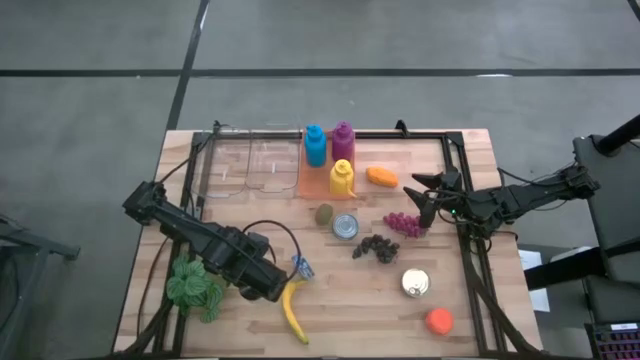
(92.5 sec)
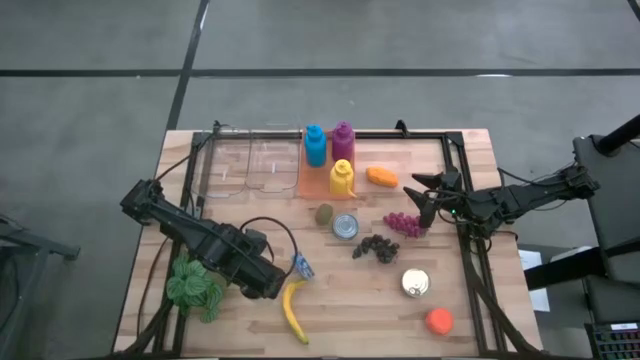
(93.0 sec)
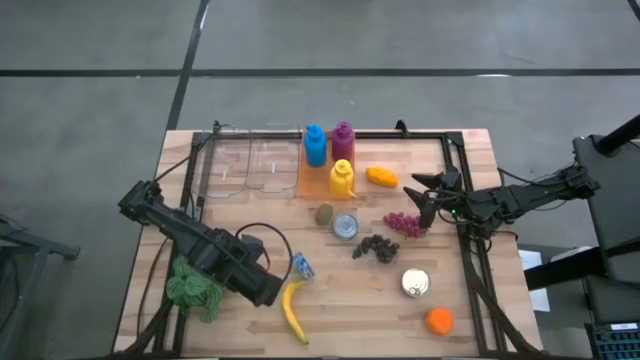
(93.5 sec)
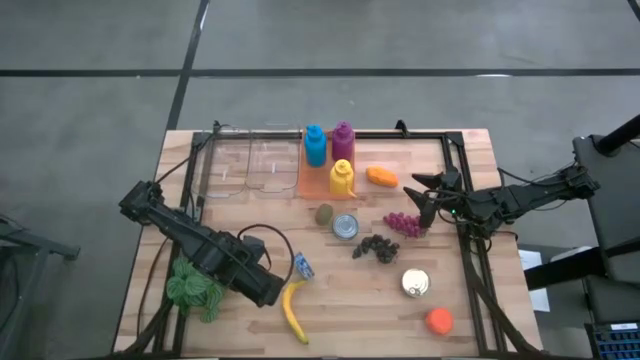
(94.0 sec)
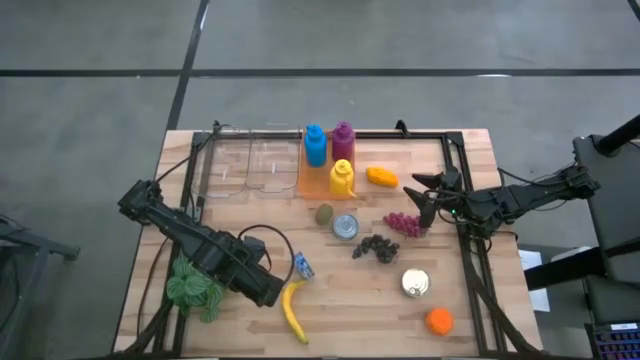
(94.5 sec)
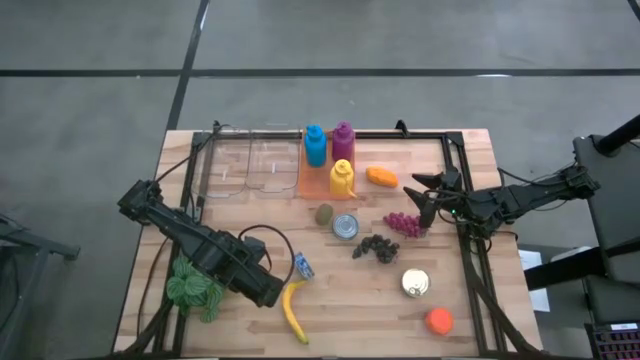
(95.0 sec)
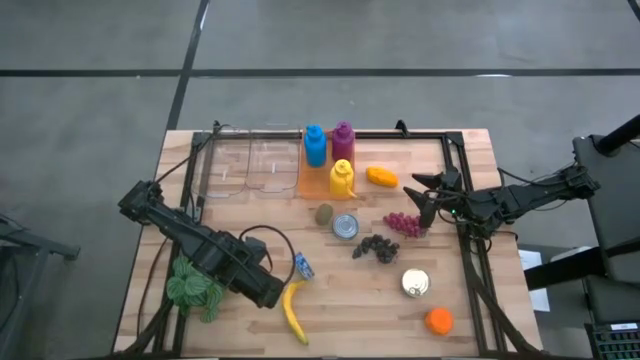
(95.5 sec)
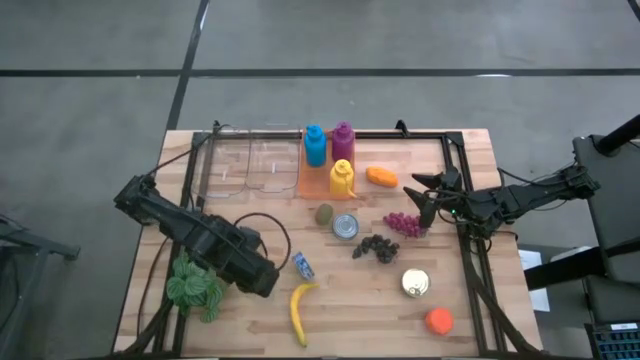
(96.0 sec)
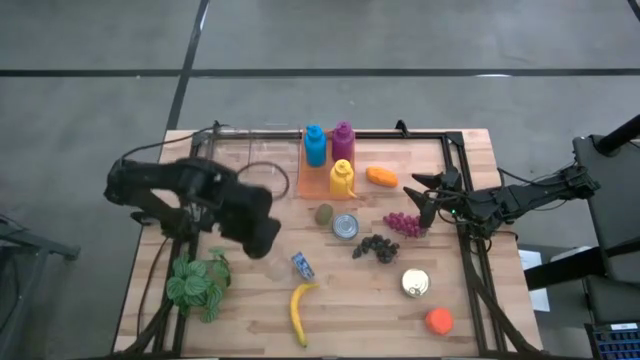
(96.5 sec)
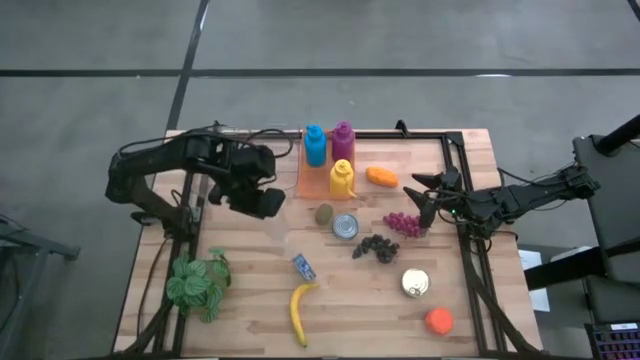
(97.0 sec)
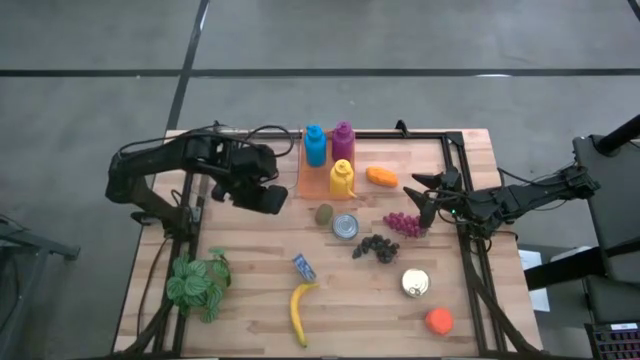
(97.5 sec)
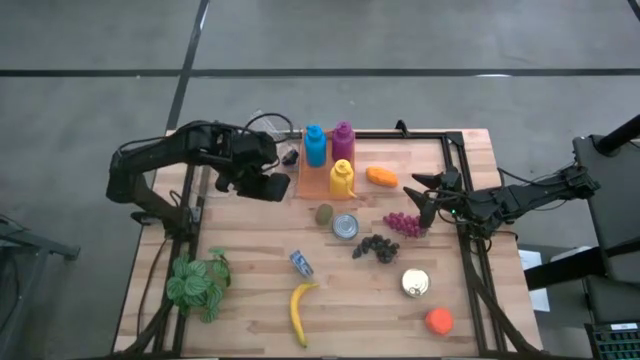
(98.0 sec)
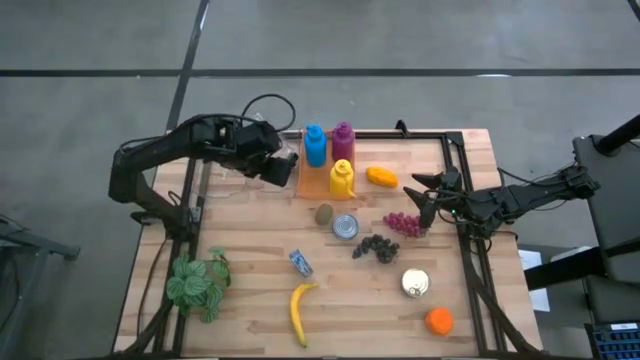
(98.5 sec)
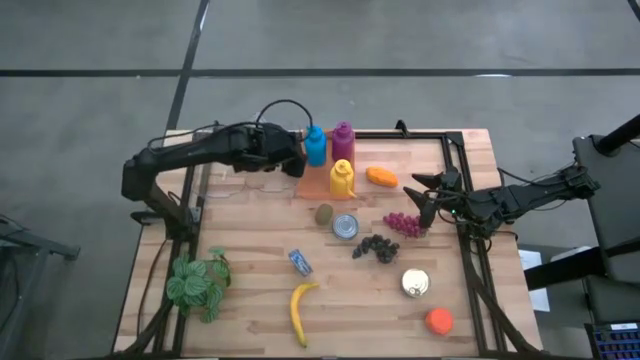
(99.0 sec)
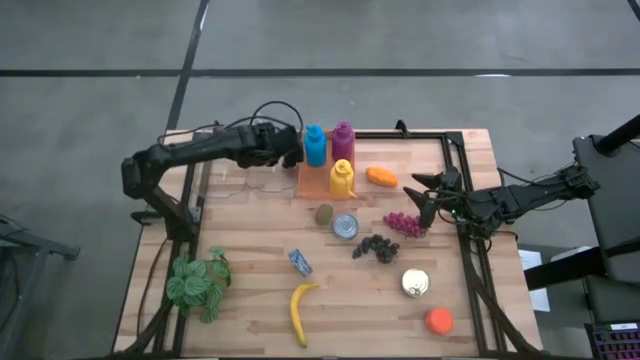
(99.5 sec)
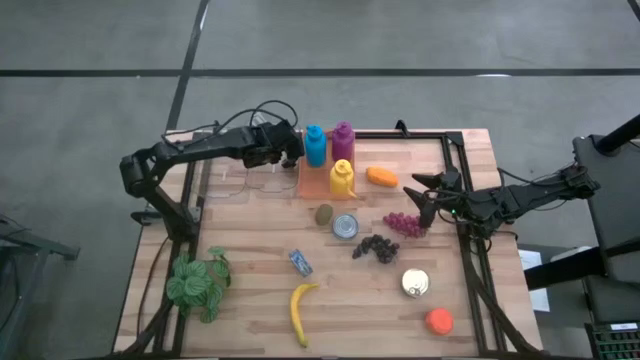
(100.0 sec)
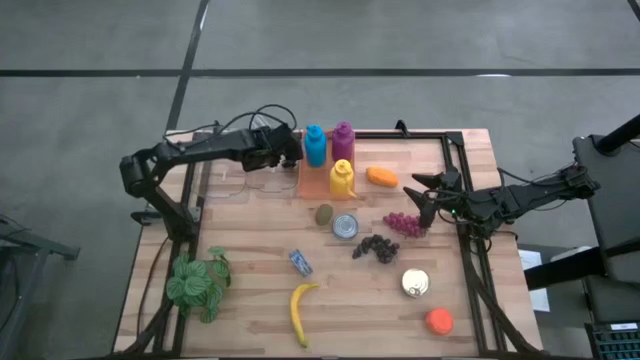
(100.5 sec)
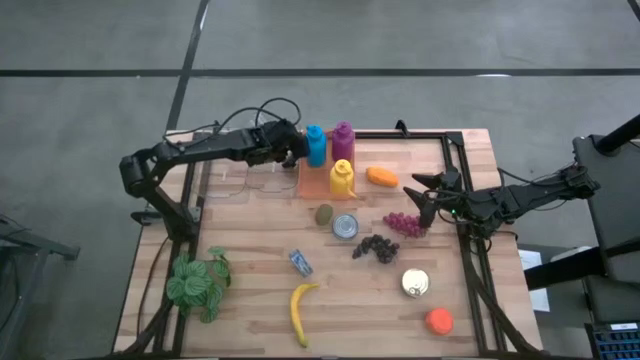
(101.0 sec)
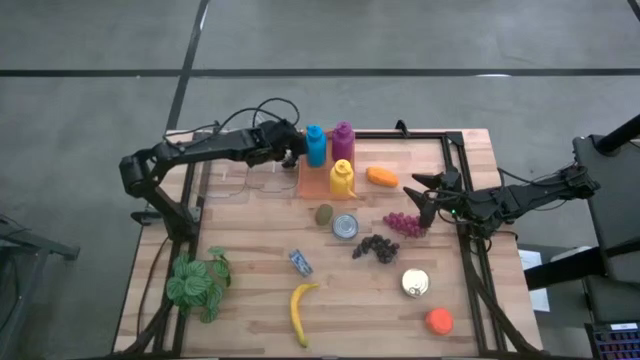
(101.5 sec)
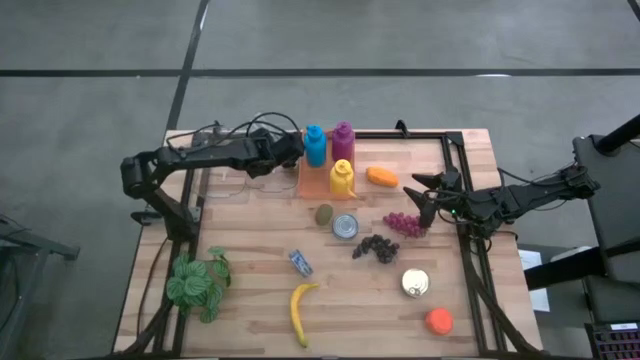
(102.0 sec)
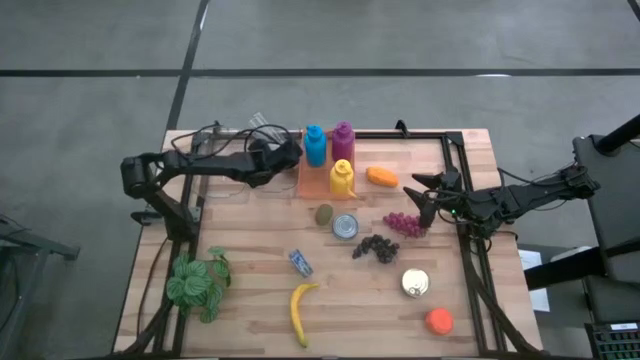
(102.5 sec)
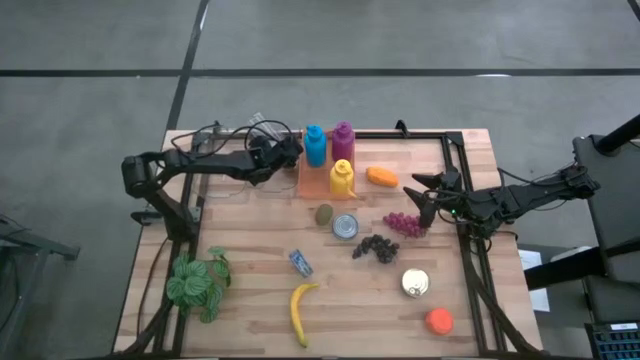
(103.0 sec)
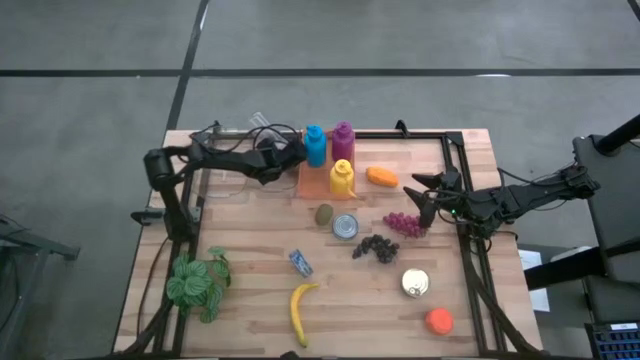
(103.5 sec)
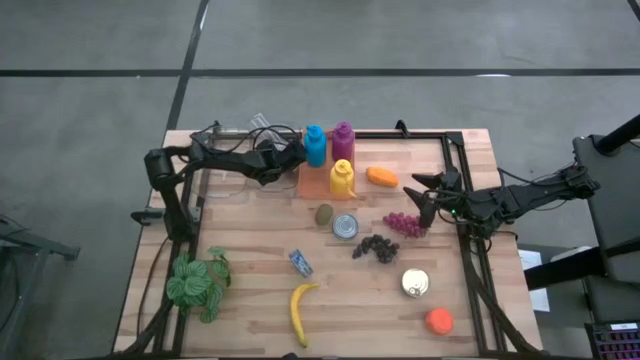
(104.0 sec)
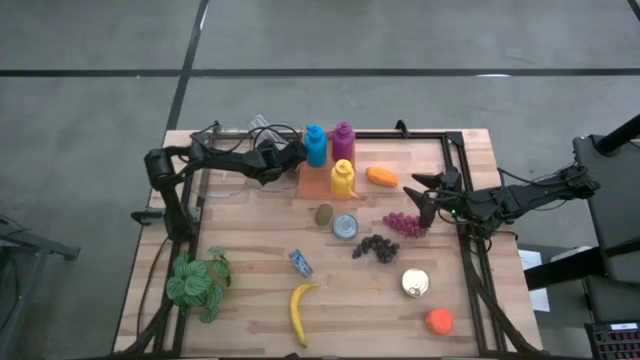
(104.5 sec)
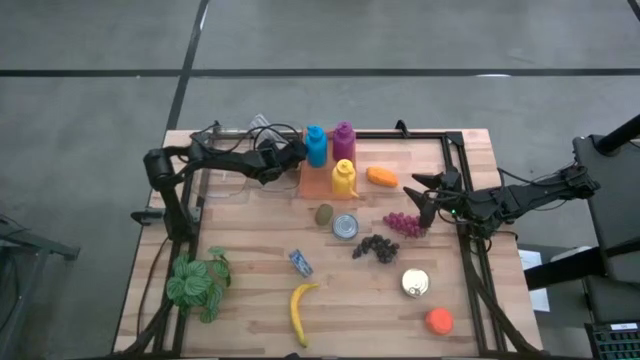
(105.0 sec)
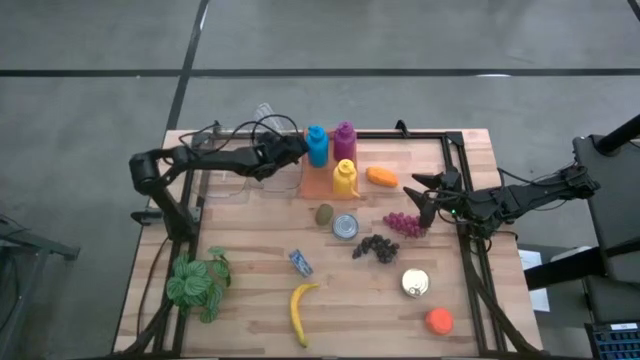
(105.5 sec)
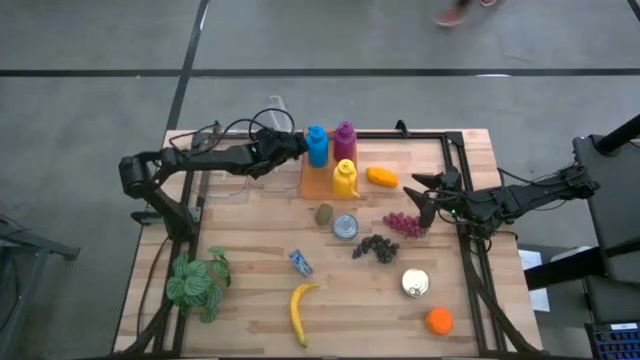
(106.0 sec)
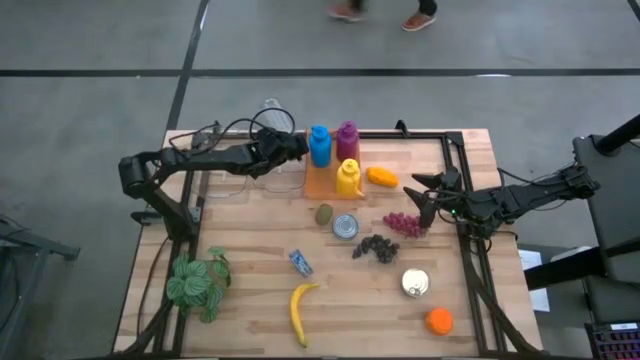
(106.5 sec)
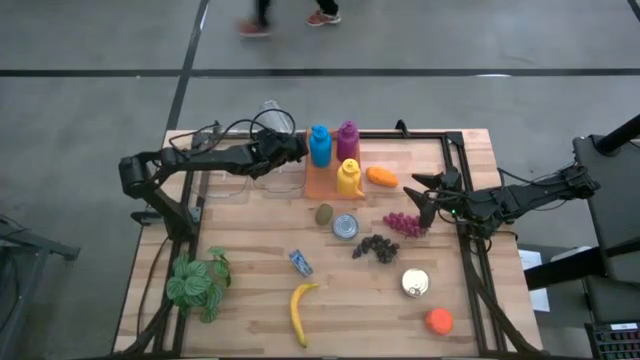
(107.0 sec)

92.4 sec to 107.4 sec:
Task: Pick & Place Food Item
Put the transparent tumbler into the orange bin

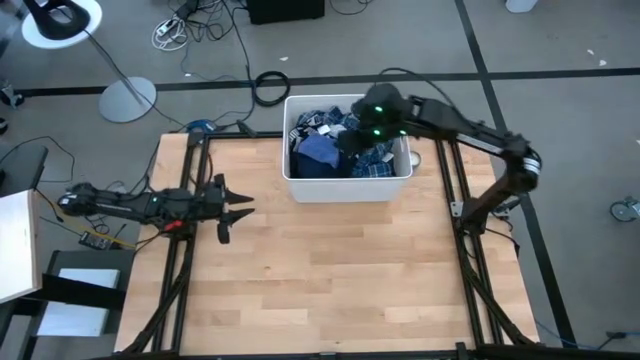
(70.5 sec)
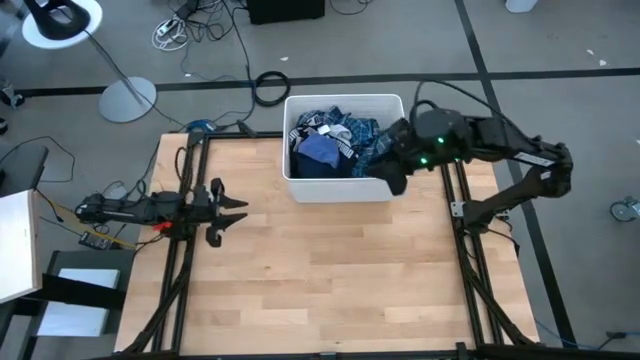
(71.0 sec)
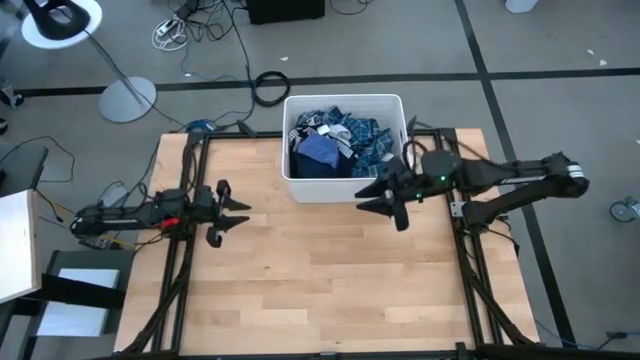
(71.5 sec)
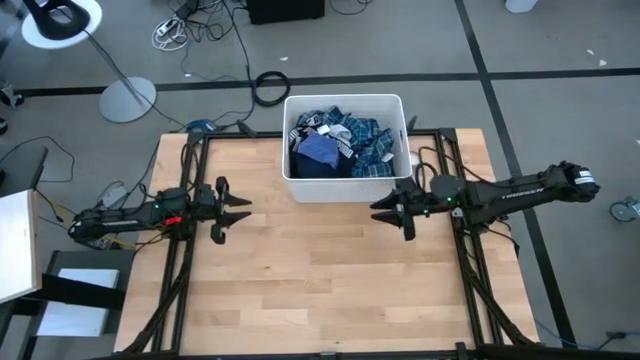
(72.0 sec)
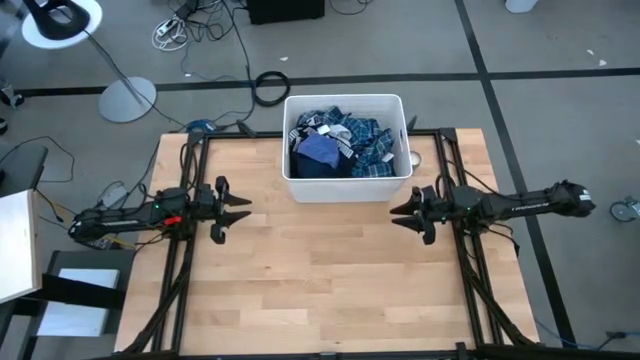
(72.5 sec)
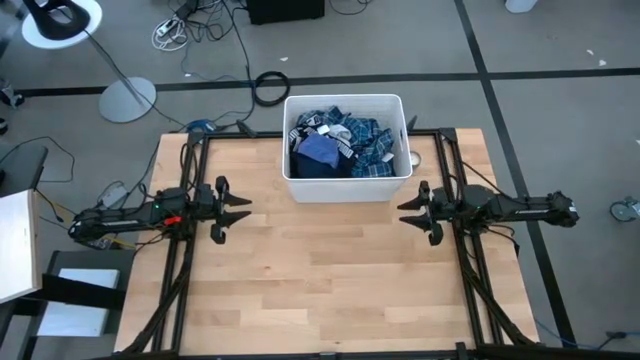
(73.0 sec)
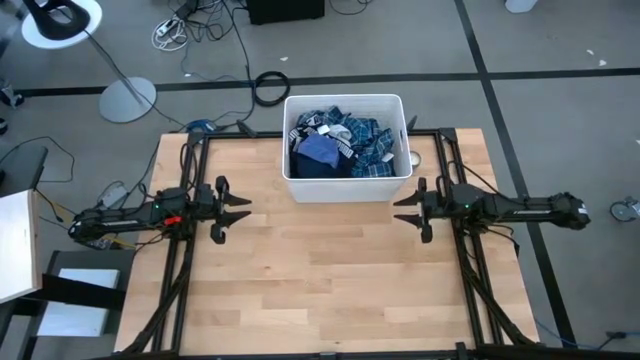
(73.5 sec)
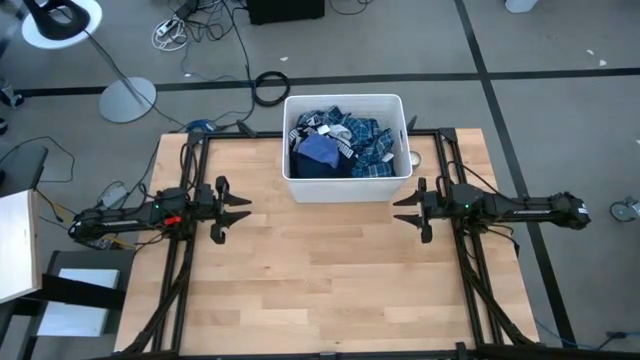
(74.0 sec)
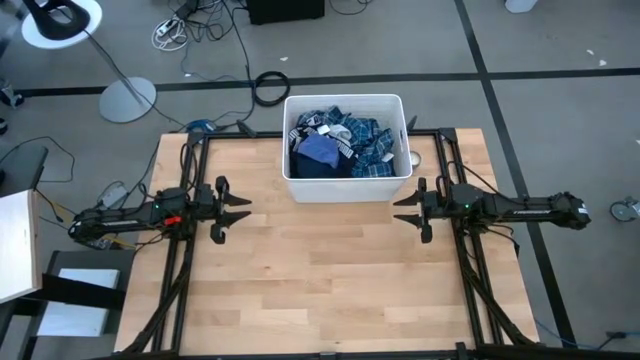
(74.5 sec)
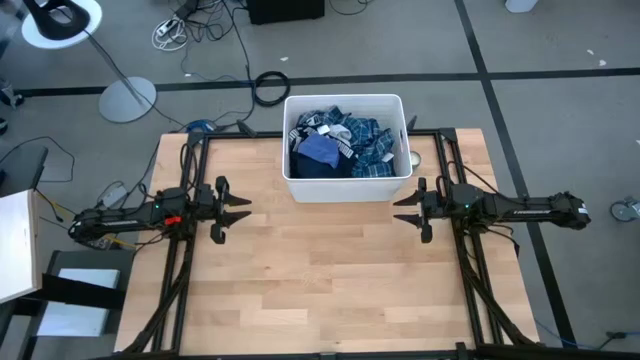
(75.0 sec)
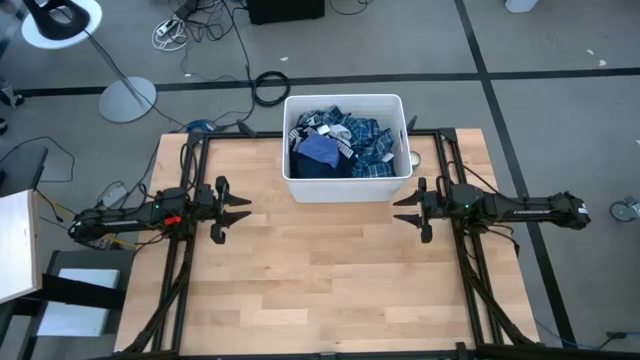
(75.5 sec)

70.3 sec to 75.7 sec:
Task: Sort clothes
Return to Home Position
